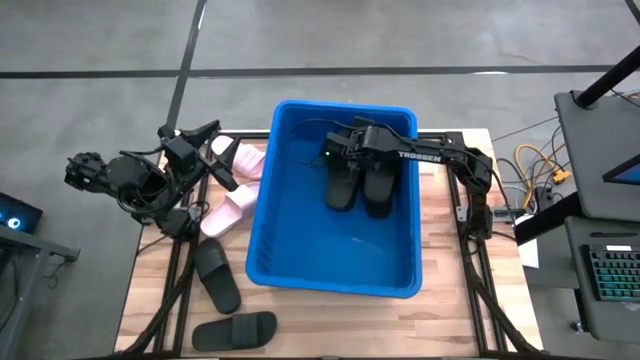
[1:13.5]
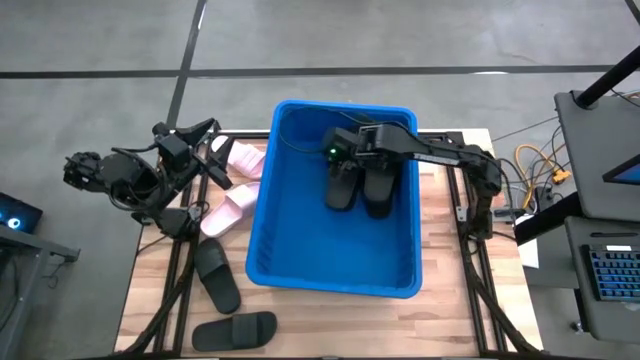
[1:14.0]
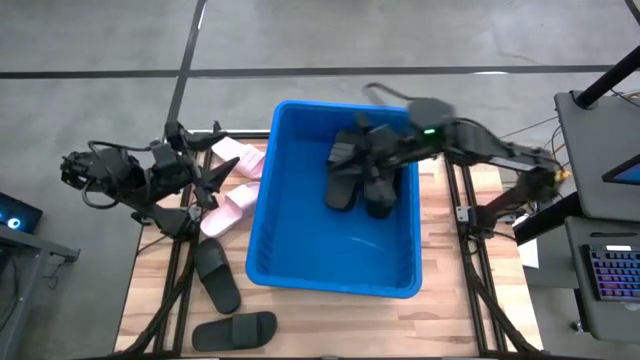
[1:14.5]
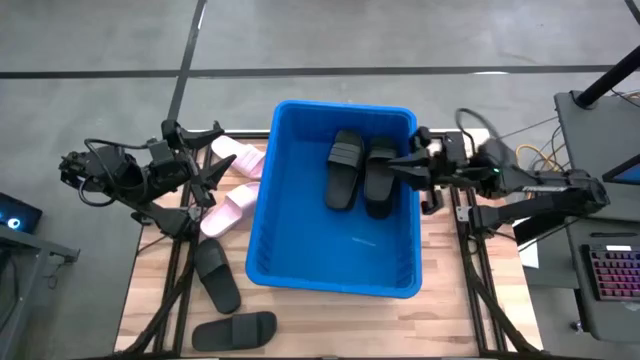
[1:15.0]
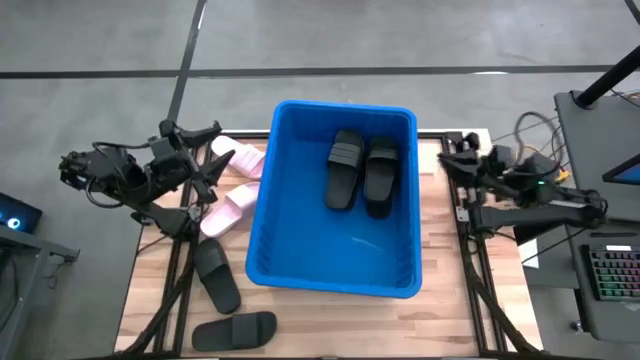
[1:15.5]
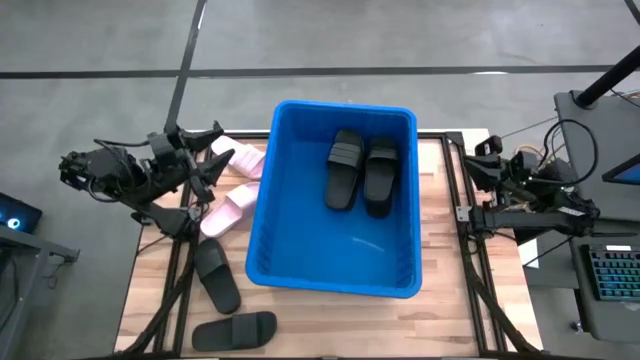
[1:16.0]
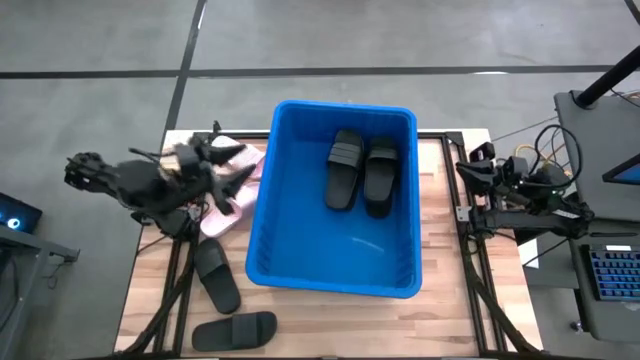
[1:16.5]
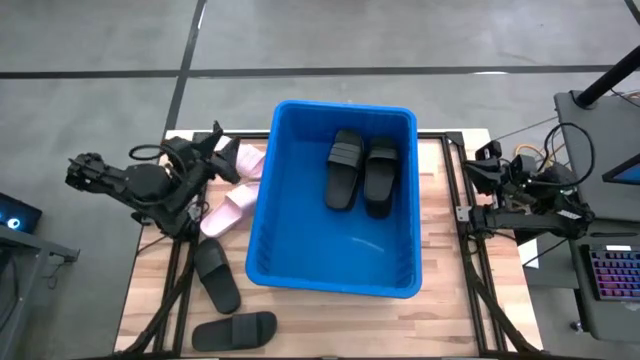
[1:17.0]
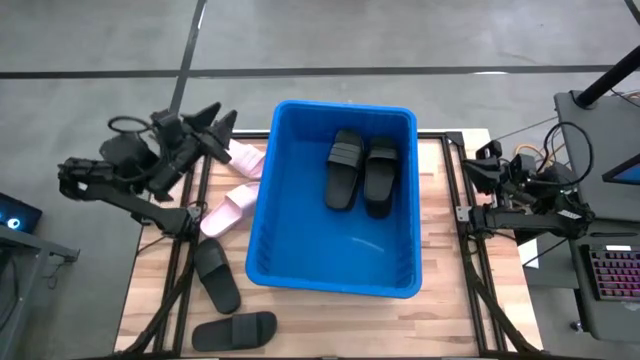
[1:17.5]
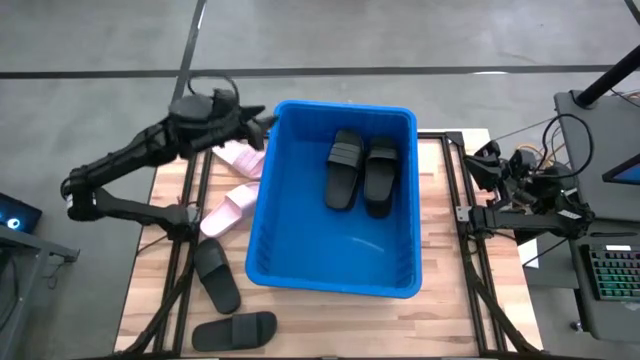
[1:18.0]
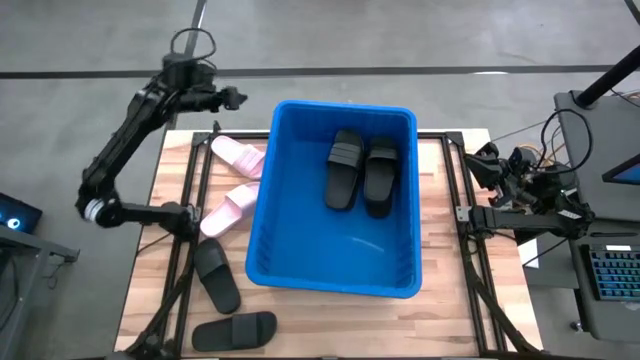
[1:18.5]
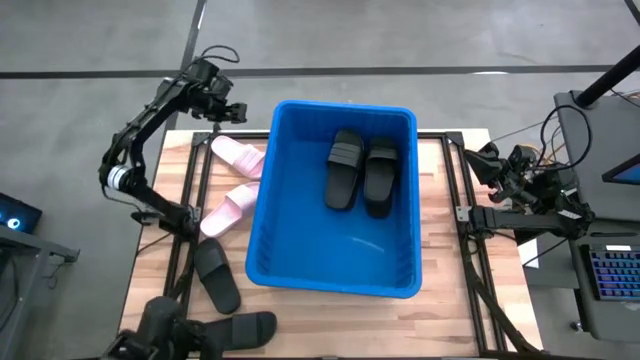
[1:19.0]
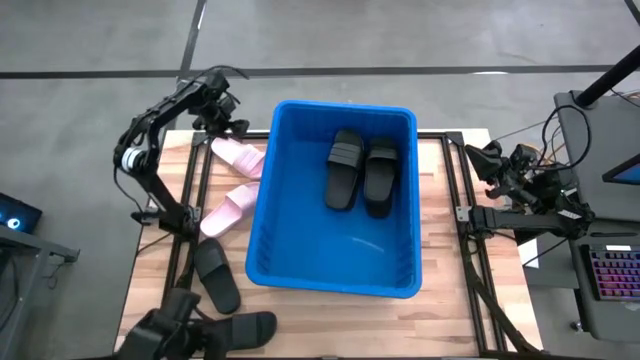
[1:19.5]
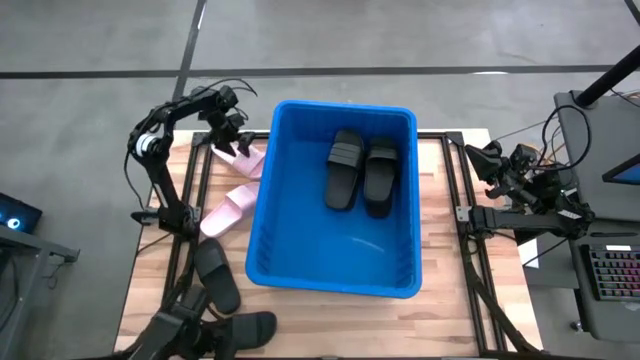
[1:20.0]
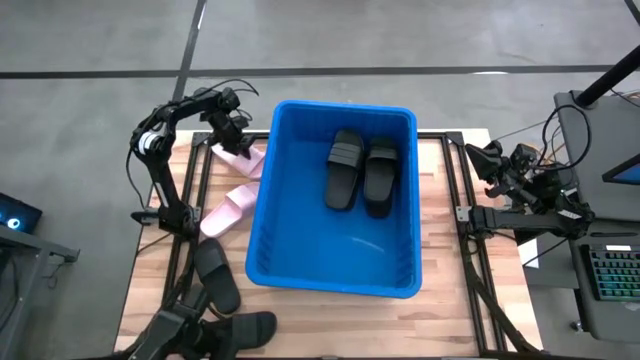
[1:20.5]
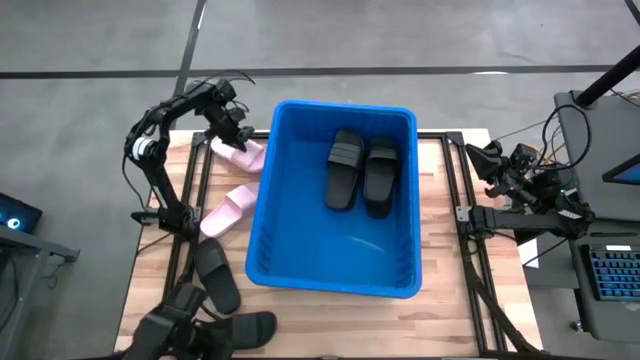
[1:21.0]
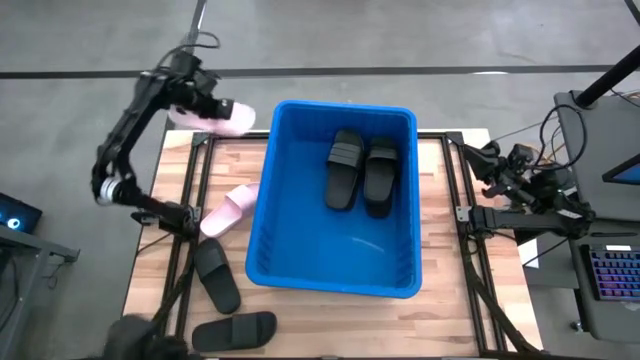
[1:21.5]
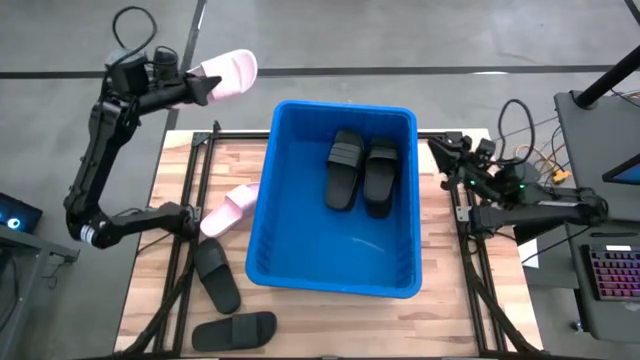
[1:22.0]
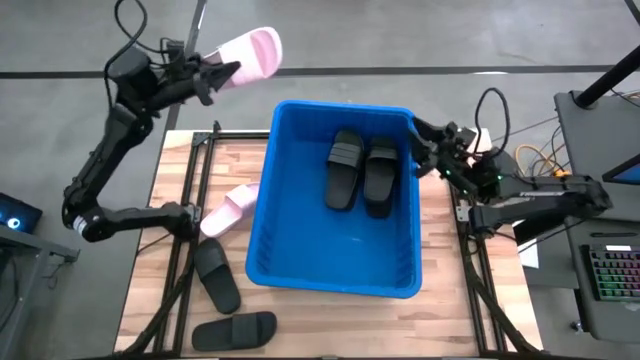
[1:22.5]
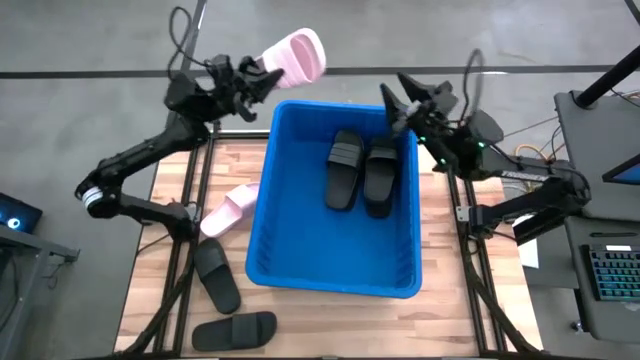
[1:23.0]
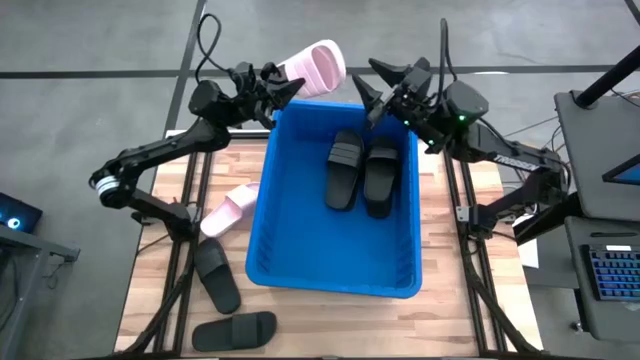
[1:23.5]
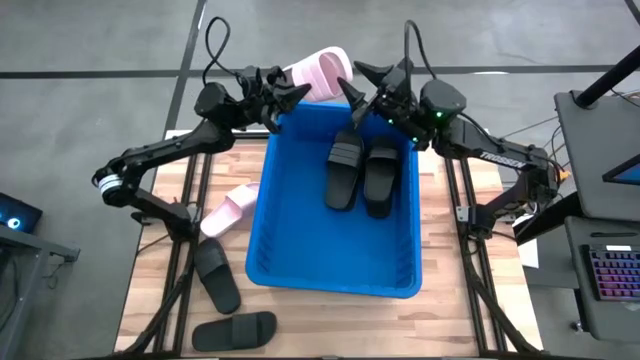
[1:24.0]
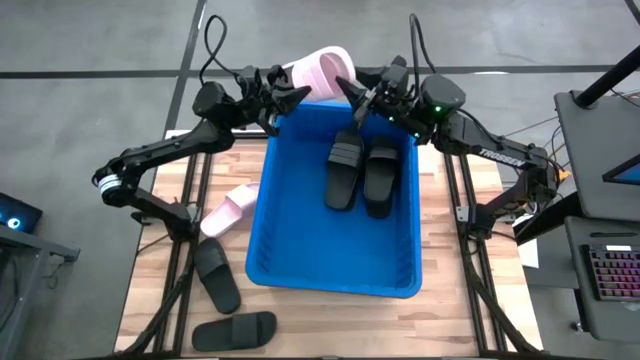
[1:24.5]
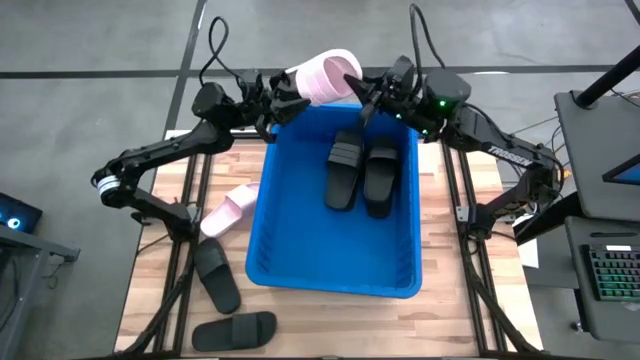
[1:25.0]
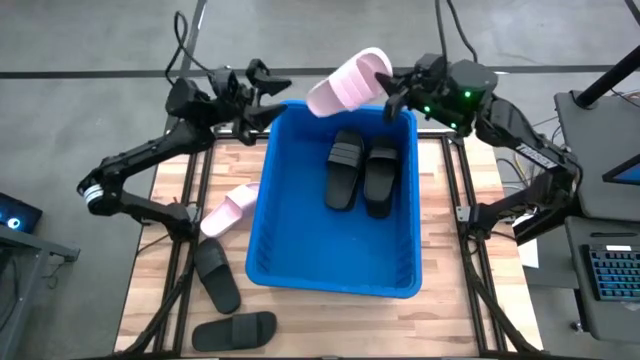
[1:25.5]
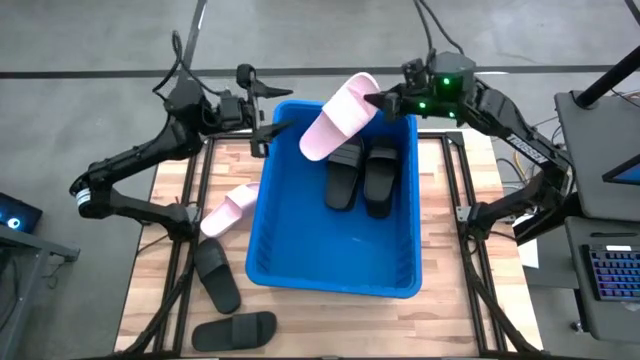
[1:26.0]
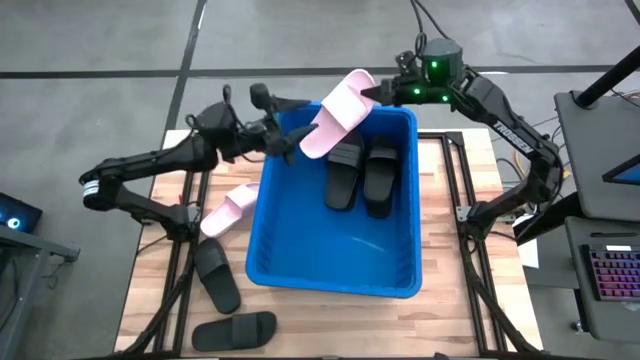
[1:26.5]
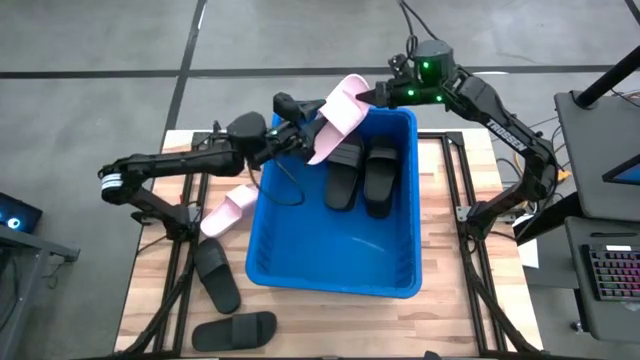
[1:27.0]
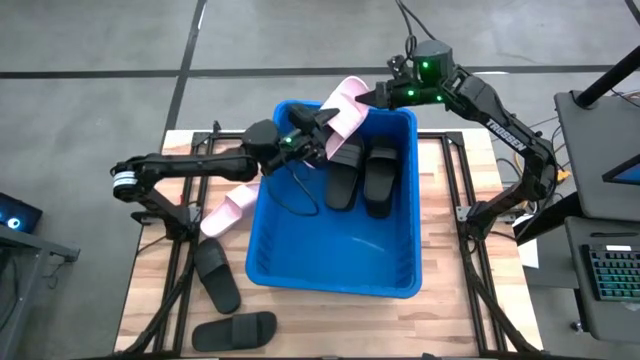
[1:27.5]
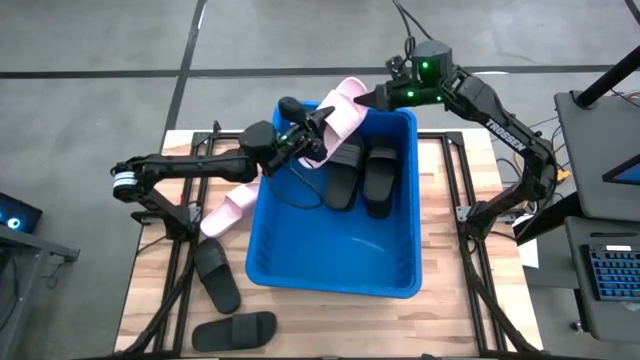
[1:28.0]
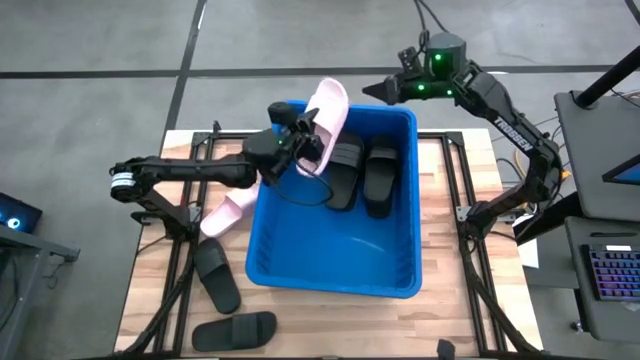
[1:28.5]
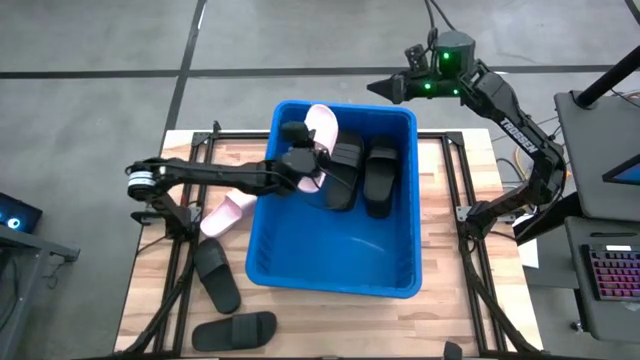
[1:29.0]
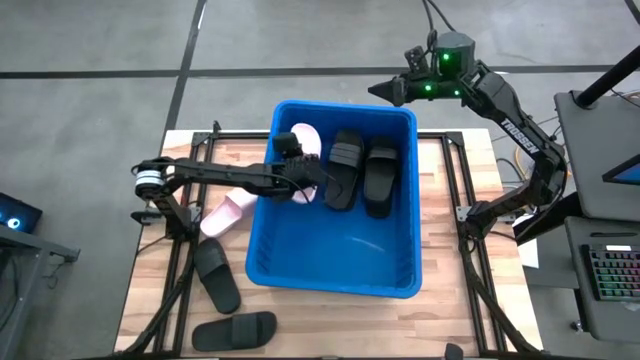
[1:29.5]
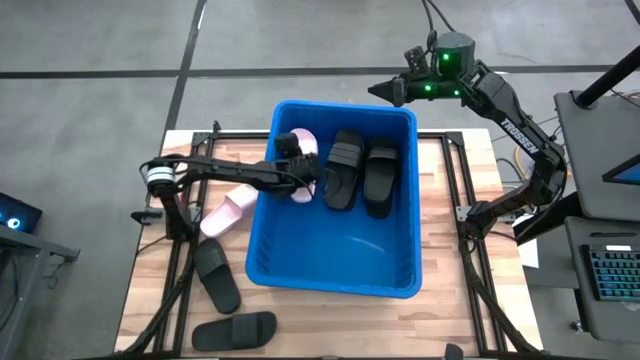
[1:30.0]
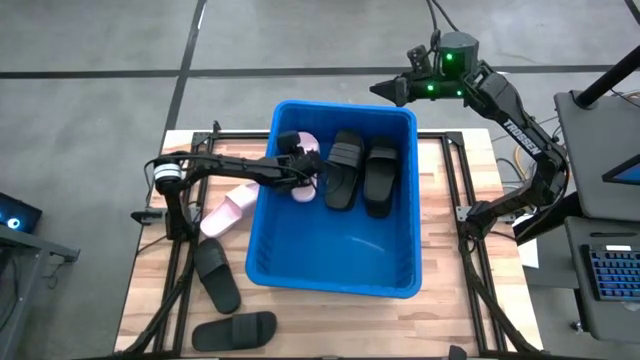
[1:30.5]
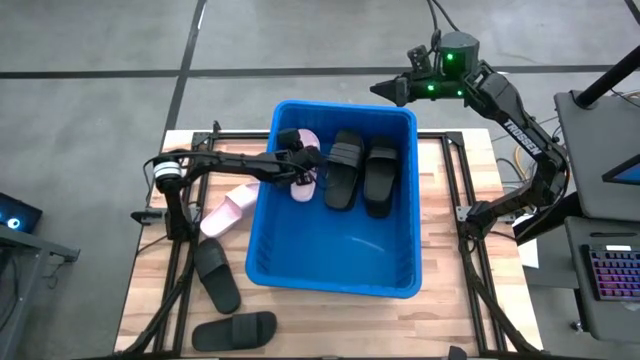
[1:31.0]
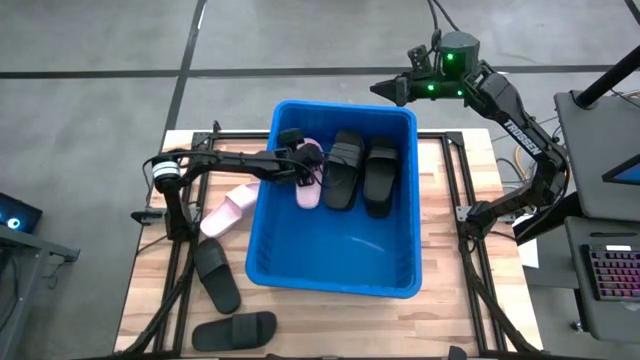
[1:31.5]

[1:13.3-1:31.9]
Task: Pick and place slides into bin
Put the pink slide into the blue bin

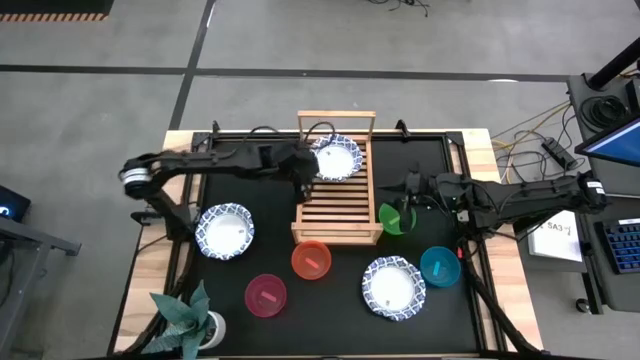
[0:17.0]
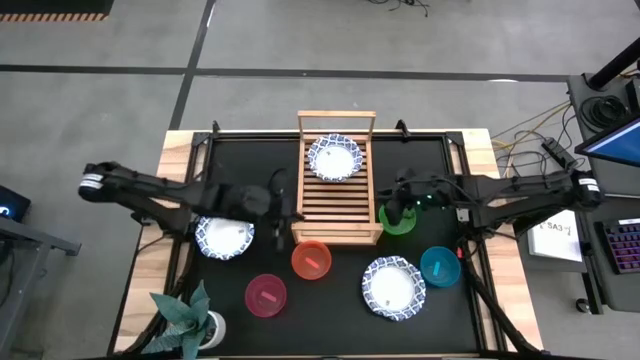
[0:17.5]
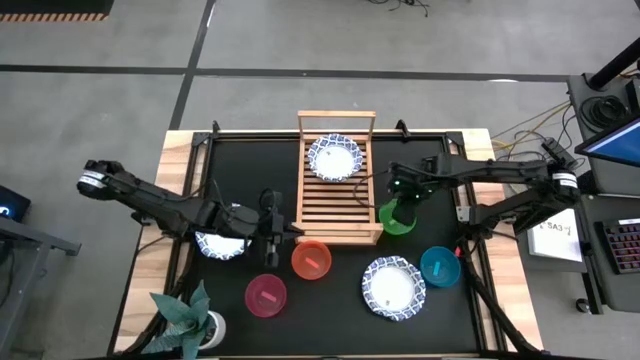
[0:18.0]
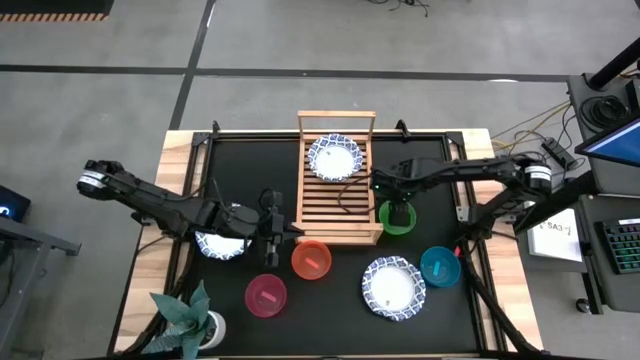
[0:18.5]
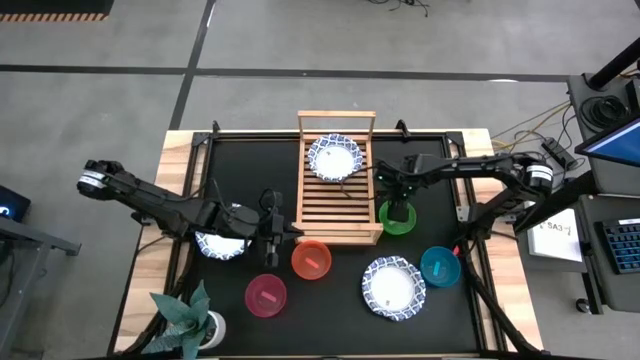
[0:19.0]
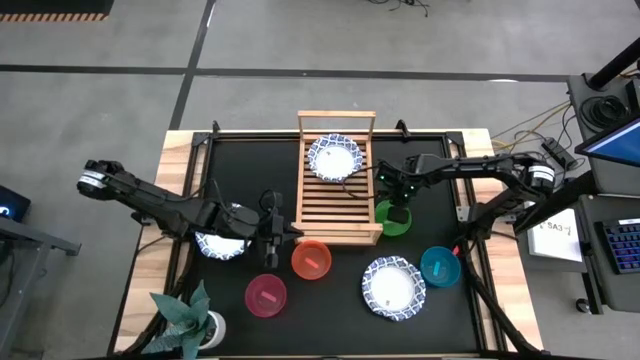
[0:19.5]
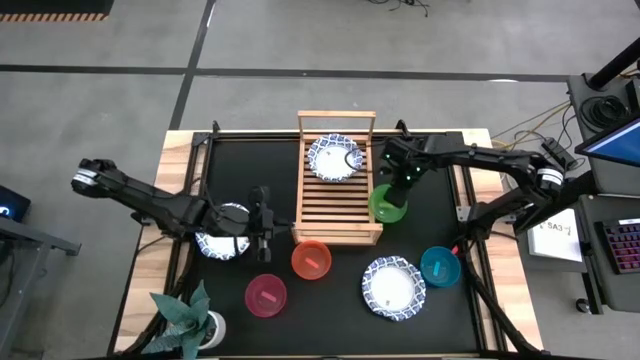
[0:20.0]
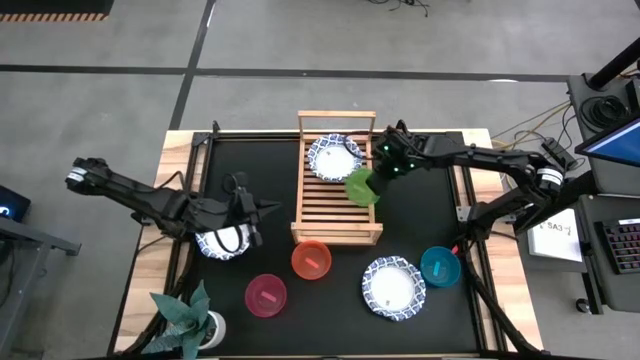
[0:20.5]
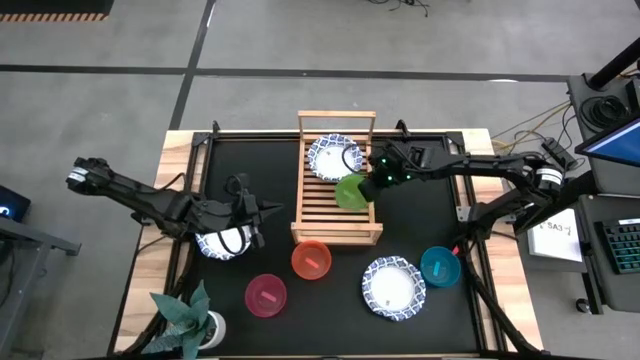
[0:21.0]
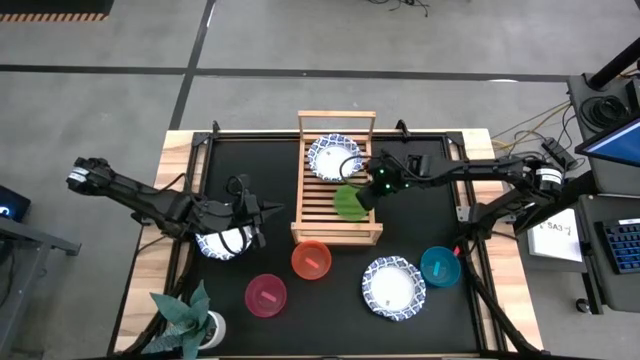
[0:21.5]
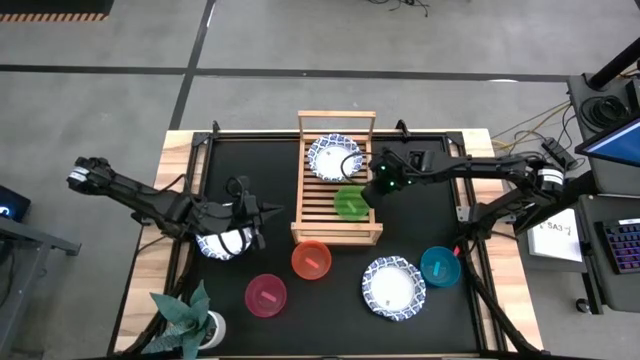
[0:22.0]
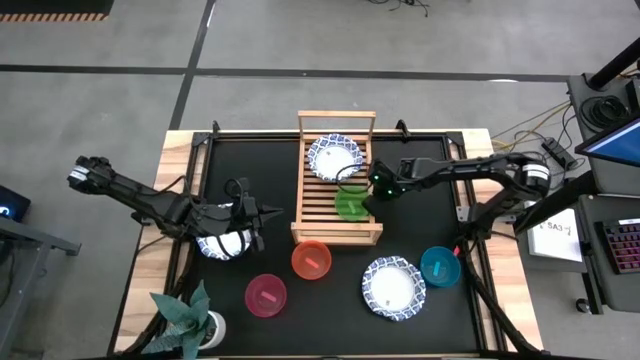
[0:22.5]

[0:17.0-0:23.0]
Task: Place and stack bowls onto a shelf
Put the green bowl on the shelf
